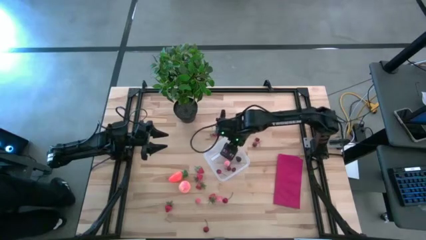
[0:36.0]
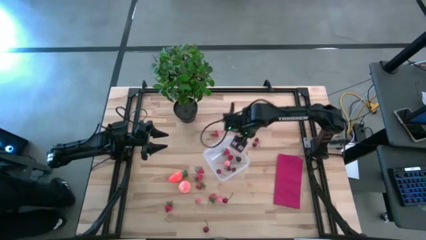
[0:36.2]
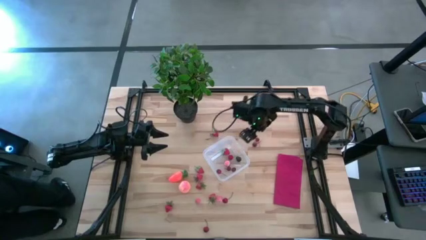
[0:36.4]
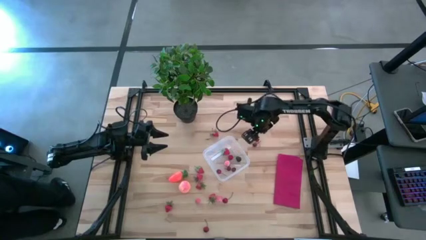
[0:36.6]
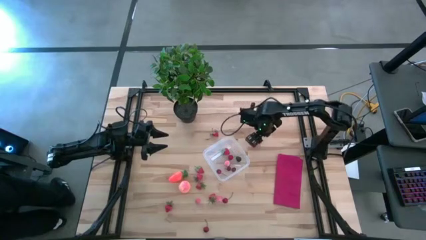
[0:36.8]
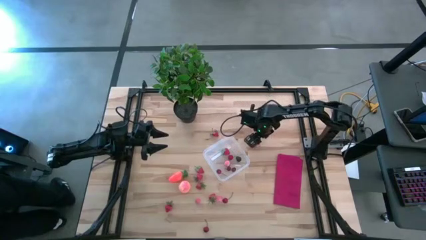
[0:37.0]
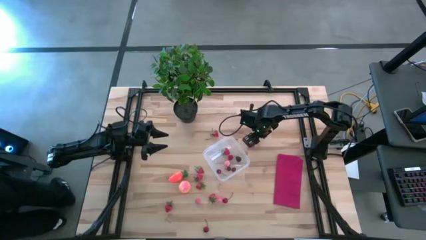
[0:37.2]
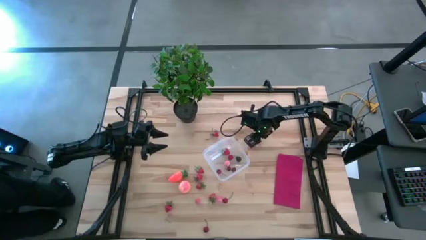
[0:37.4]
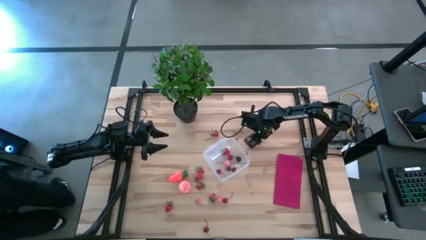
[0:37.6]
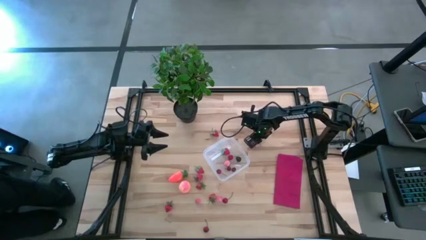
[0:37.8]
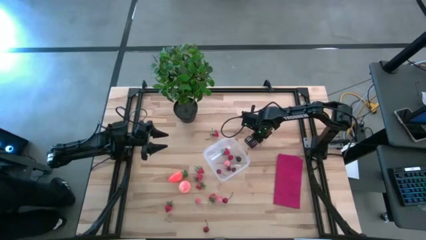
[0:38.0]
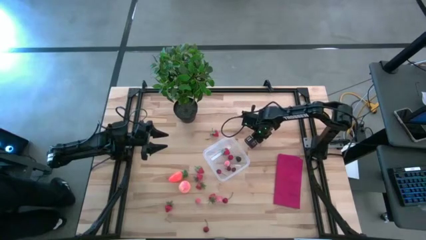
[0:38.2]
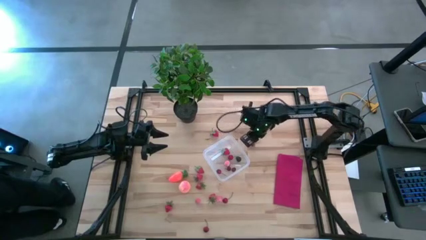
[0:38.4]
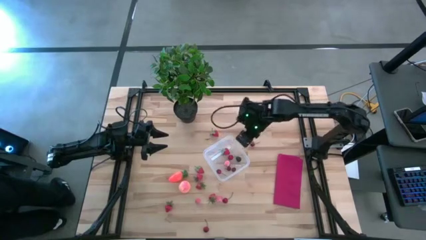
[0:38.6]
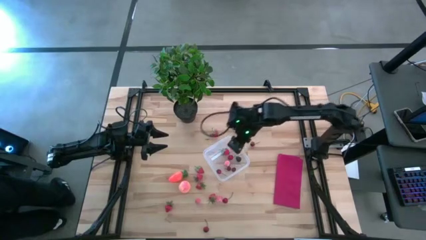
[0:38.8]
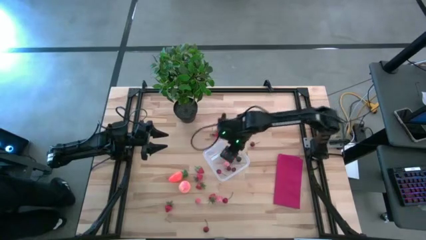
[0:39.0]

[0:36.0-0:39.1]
Task: Pick and placing Produce into tupperware
Put the red cherry into the transparent bin

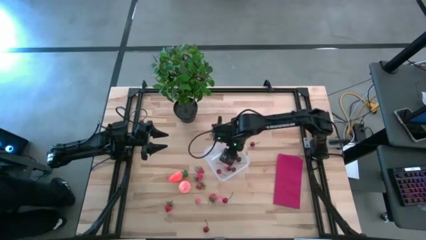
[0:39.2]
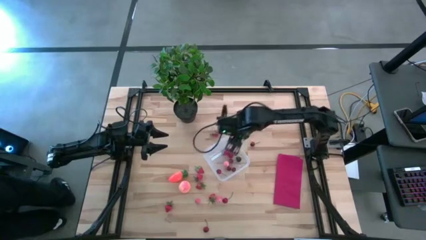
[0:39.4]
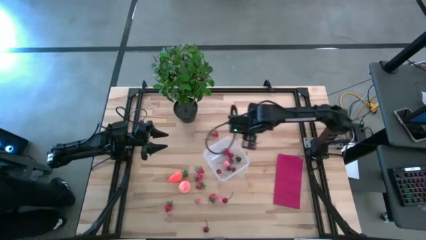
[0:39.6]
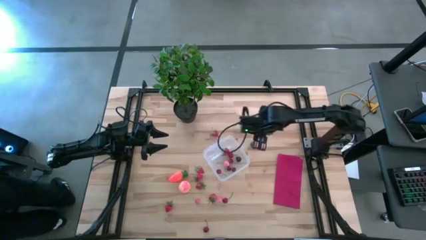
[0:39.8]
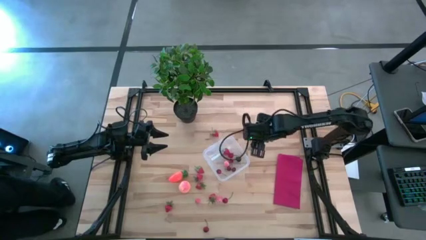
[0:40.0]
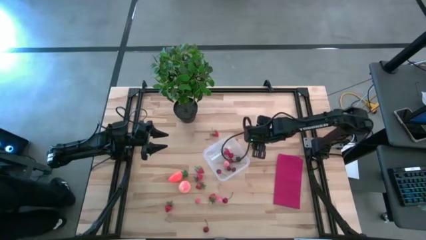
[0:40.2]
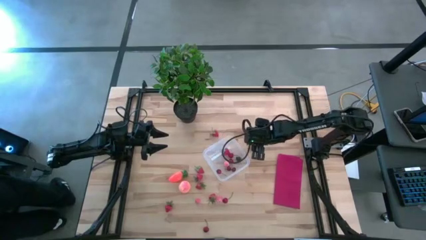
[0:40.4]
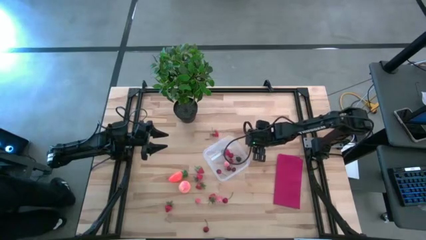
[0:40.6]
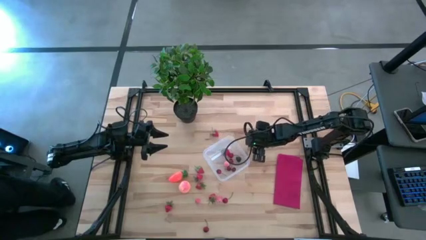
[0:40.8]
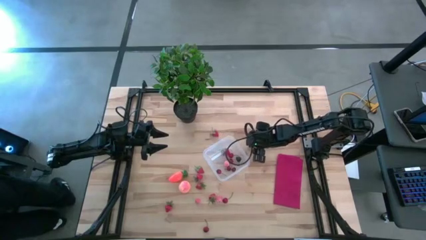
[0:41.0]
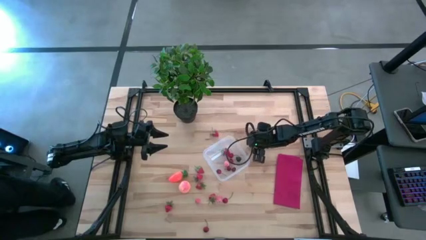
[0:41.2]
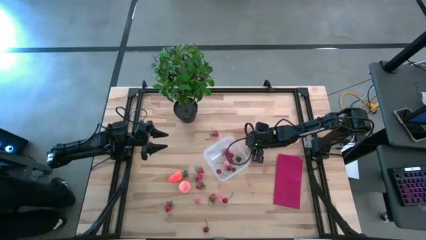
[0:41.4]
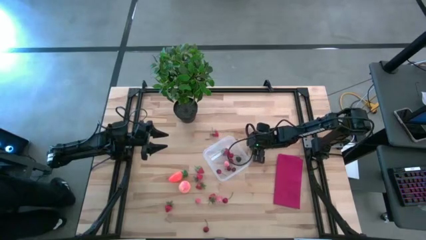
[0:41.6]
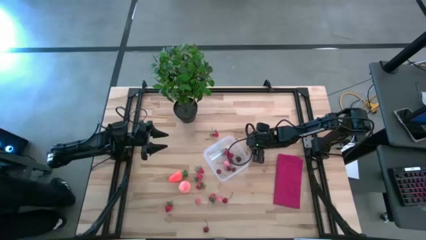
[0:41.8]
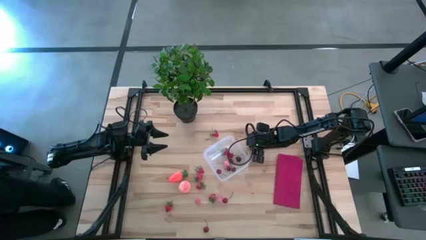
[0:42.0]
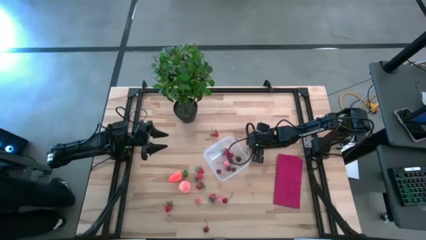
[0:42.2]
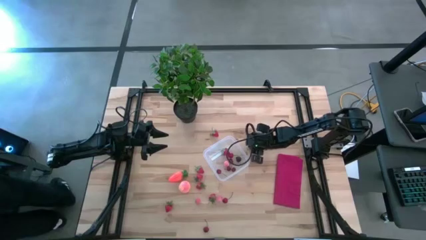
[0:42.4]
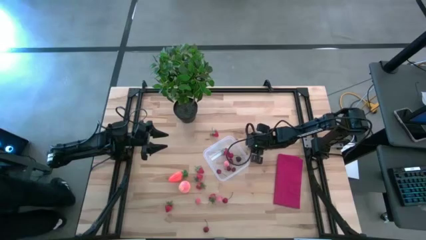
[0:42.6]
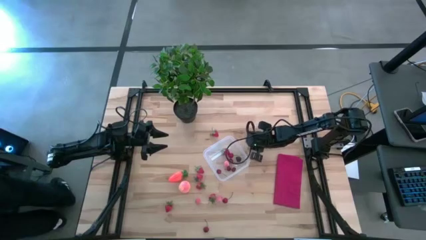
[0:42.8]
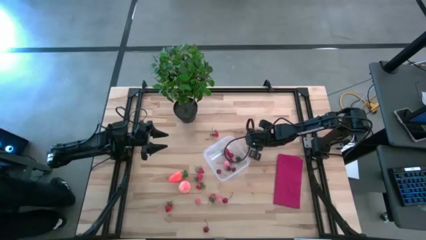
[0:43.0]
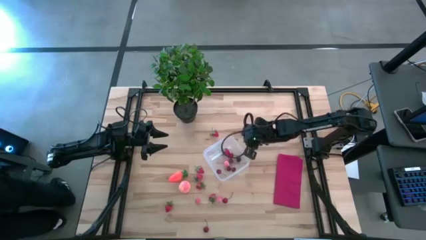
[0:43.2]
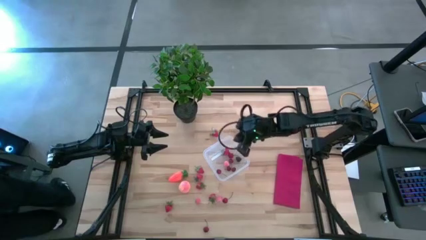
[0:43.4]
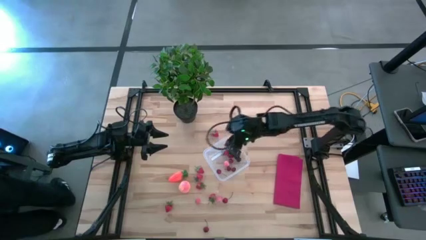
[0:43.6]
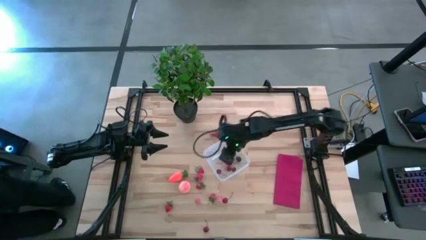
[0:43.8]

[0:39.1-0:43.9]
Put the red cherry into the transparent bin

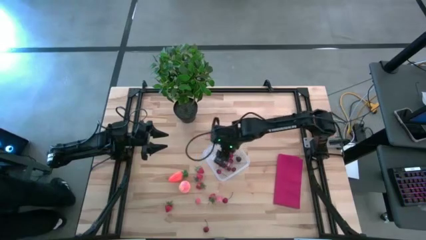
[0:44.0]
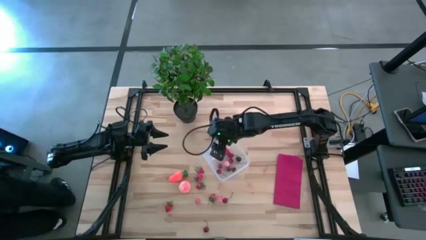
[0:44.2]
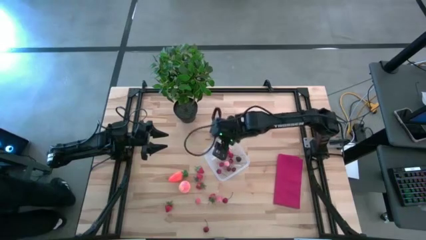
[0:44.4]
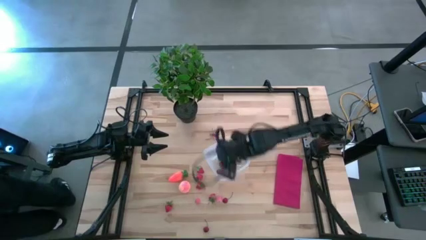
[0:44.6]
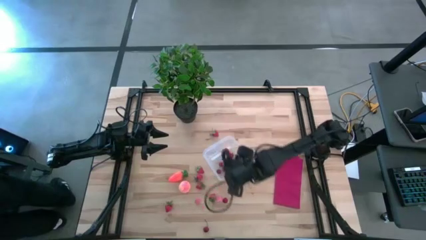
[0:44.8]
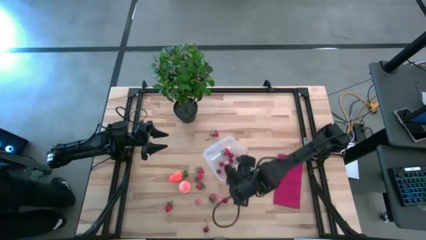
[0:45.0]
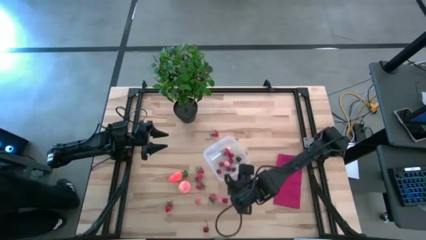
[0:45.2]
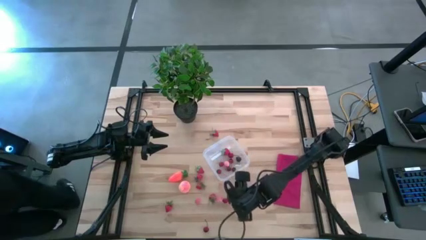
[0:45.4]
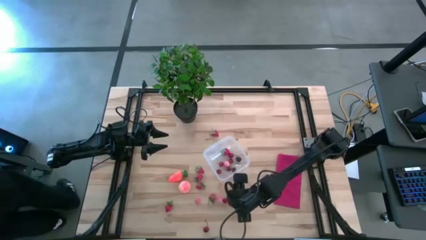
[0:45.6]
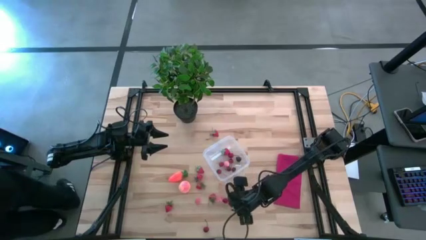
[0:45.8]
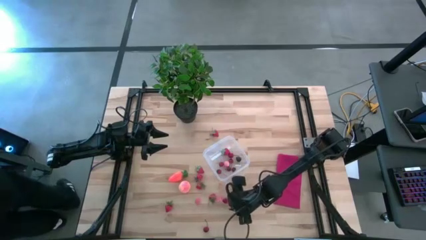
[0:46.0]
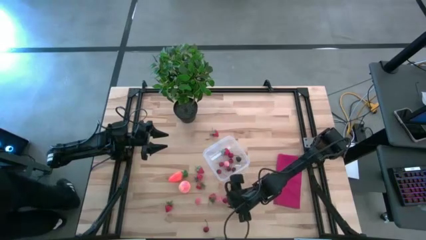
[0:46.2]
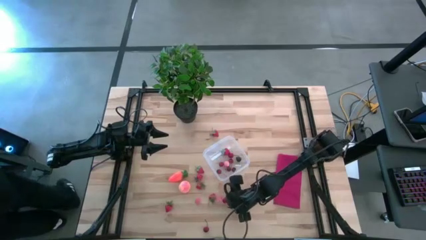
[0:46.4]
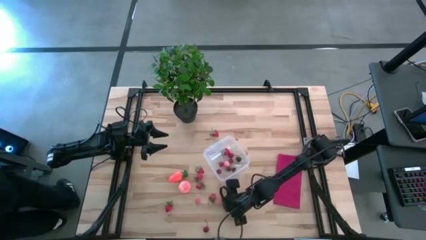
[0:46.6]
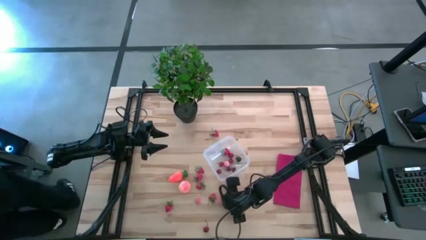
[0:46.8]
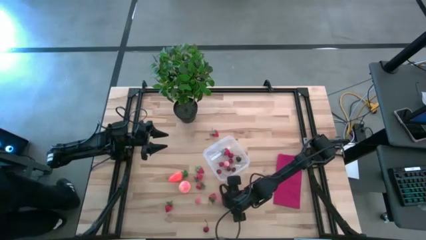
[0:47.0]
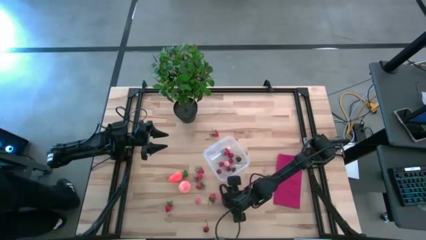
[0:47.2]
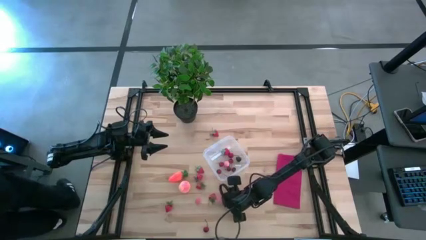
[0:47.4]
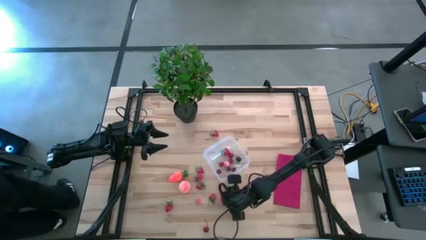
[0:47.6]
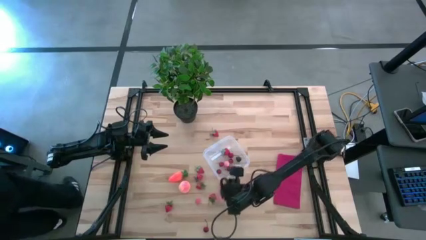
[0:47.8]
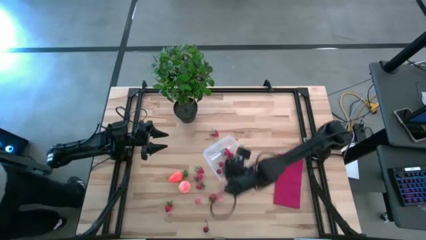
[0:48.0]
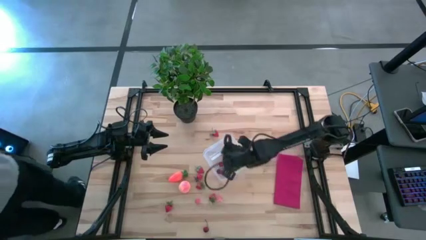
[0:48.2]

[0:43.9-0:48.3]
Put the red cherry into the transparent bin

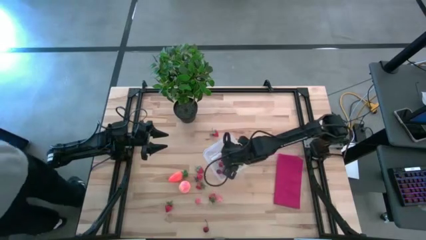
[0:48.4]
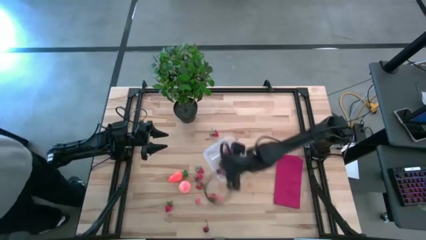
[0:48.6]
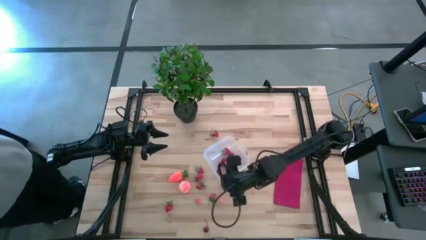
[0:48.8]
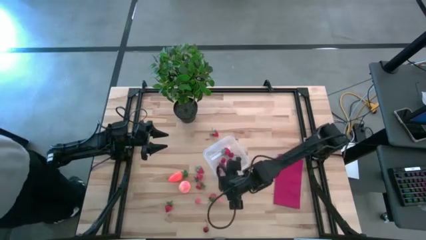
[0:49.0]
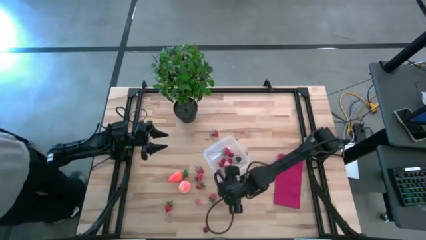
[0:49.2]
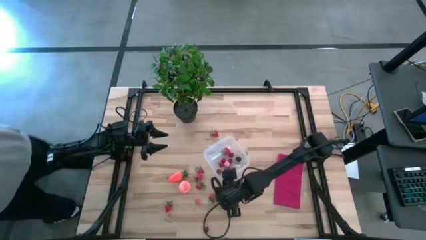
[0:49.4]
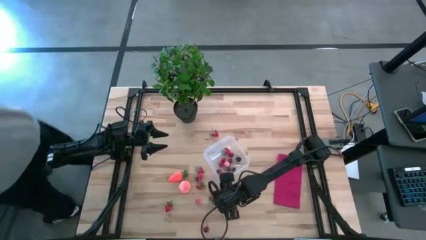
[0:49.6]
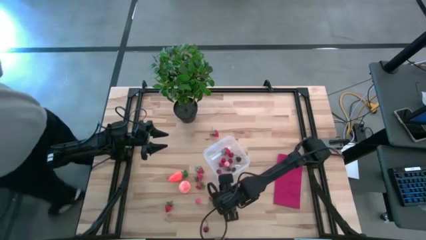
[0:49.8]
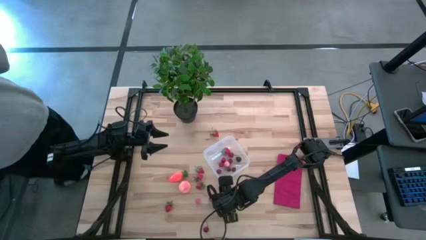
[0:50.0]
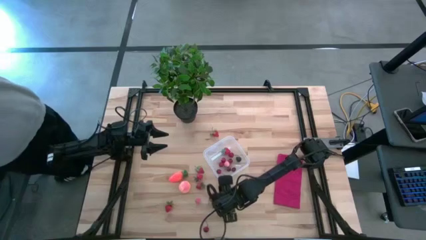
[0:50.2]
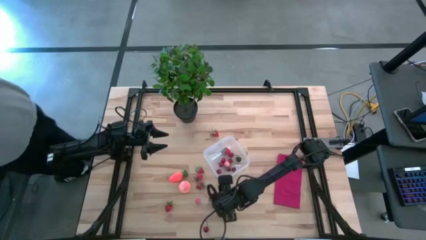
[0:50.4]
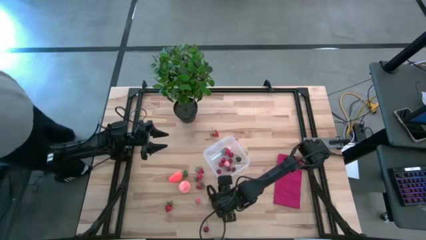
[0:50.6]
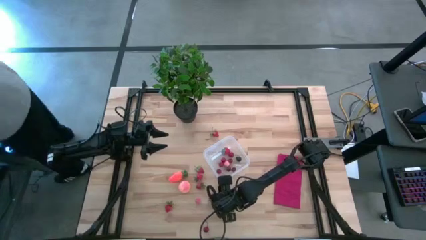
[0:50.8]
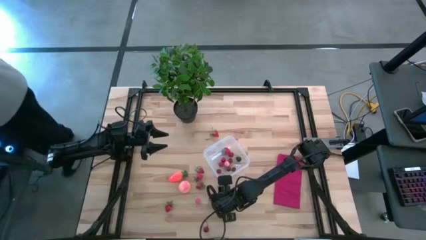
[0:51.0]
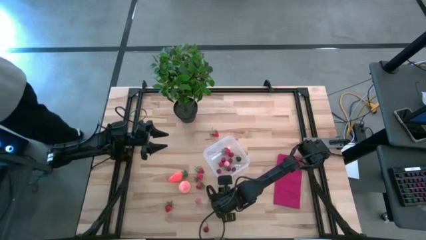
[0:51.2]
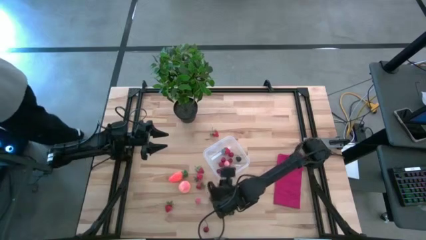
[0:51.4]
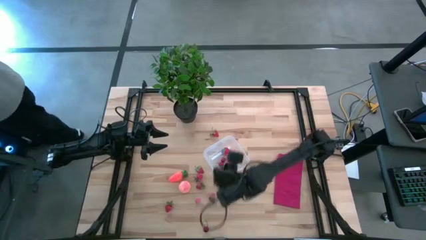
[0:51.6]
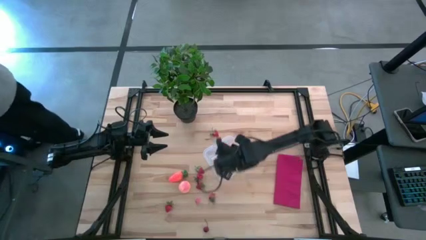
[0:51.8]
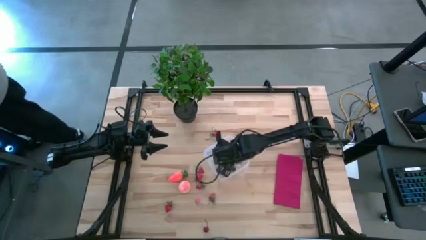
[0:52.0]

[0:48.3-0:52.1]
Put the pink peach into the transparent bin
